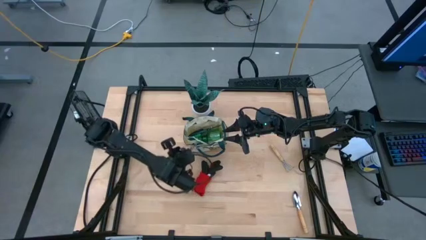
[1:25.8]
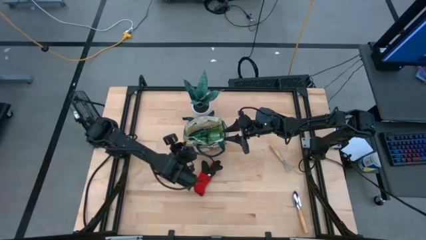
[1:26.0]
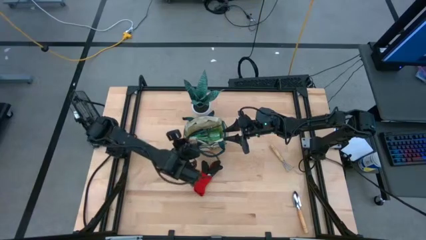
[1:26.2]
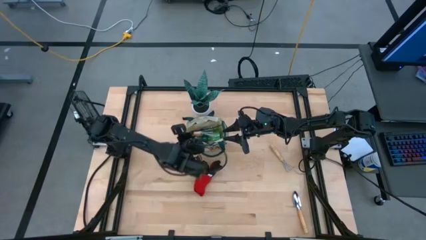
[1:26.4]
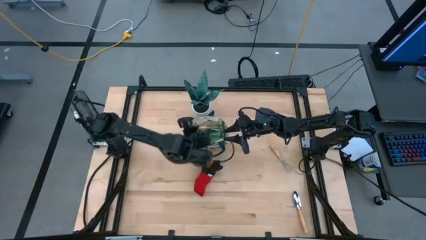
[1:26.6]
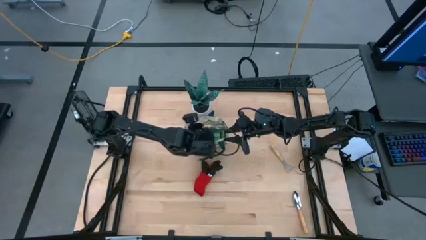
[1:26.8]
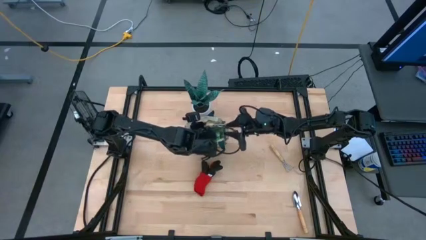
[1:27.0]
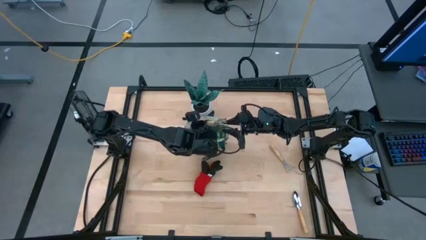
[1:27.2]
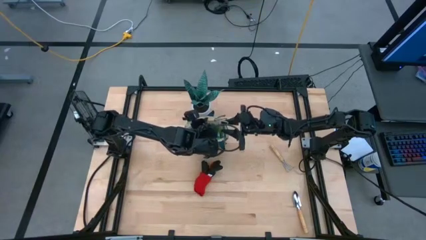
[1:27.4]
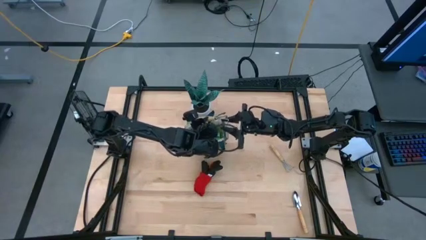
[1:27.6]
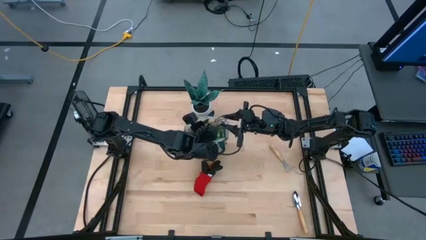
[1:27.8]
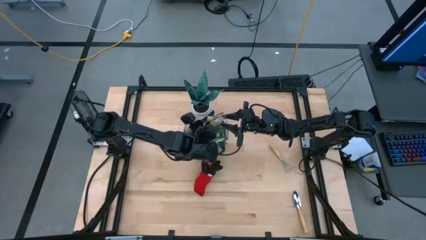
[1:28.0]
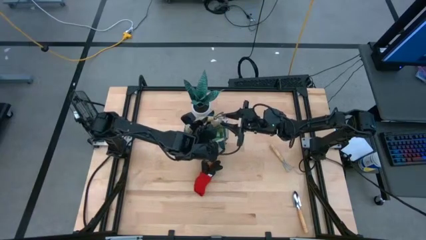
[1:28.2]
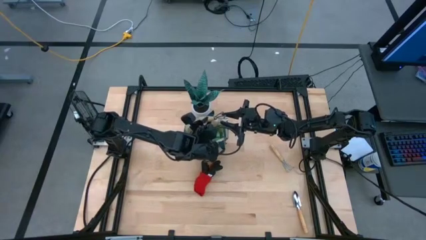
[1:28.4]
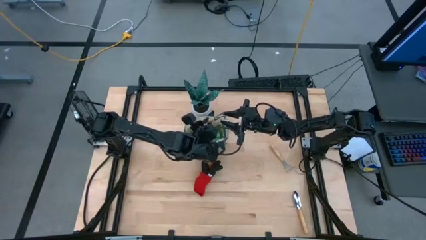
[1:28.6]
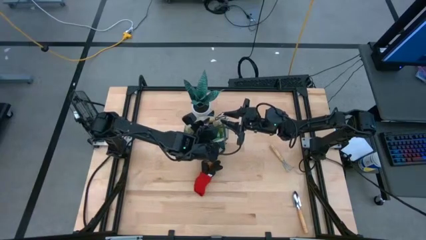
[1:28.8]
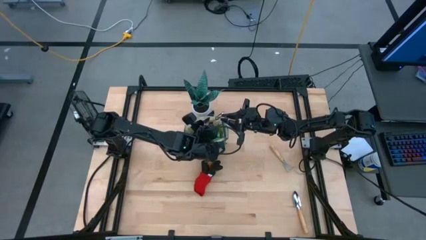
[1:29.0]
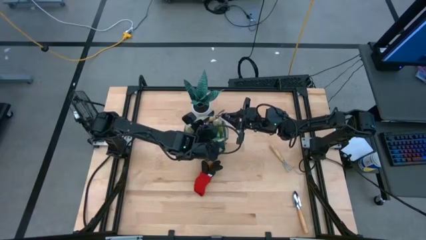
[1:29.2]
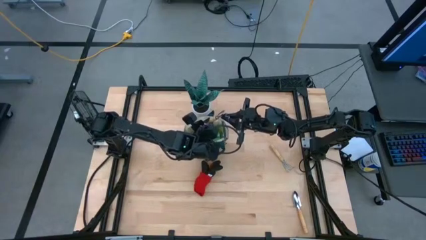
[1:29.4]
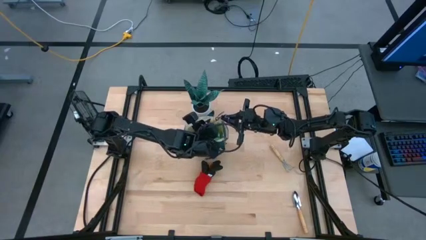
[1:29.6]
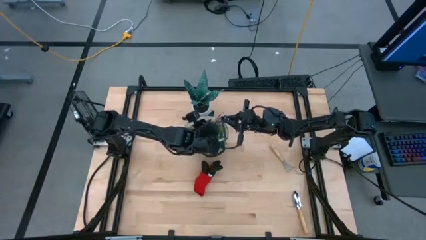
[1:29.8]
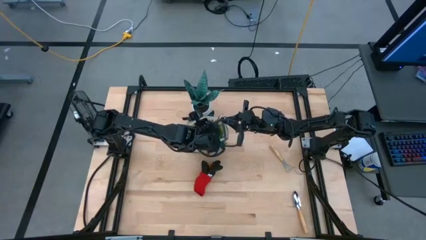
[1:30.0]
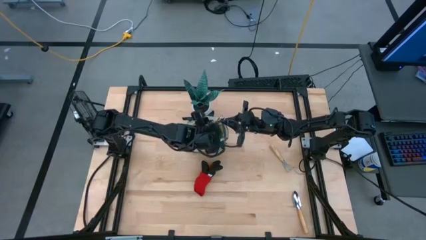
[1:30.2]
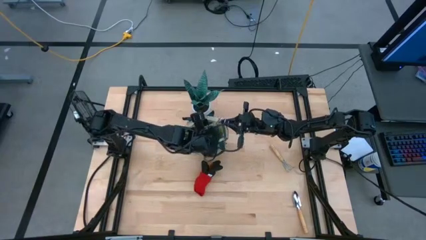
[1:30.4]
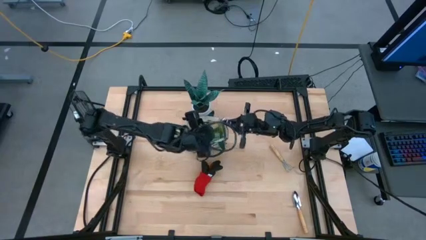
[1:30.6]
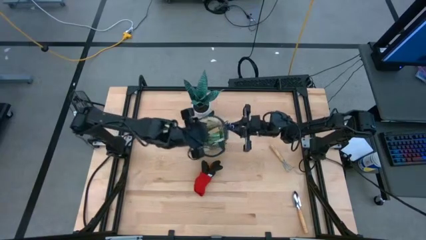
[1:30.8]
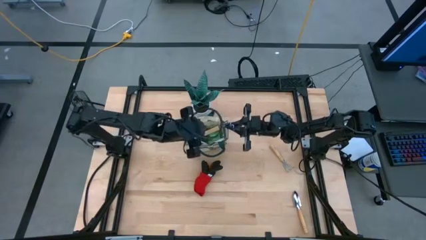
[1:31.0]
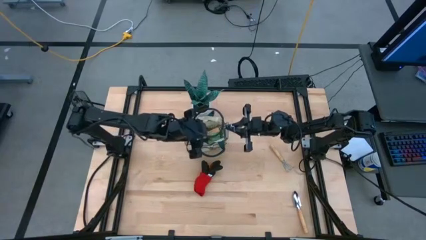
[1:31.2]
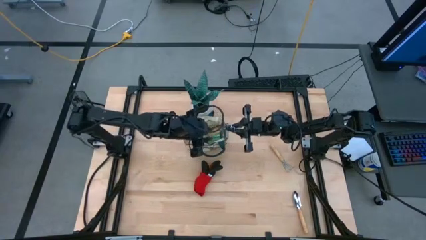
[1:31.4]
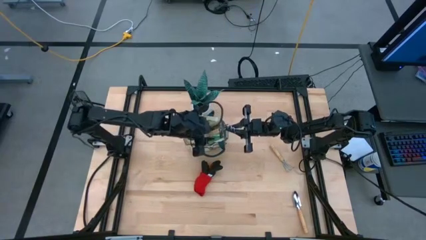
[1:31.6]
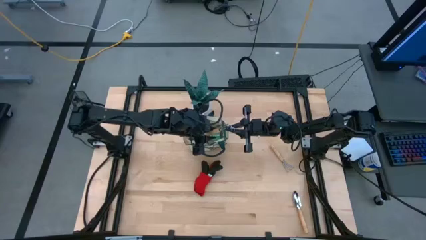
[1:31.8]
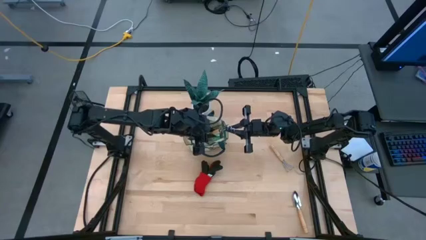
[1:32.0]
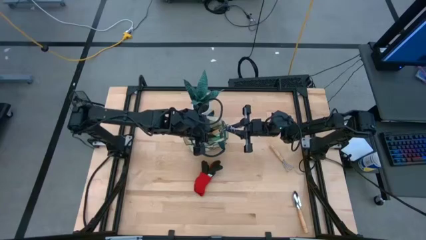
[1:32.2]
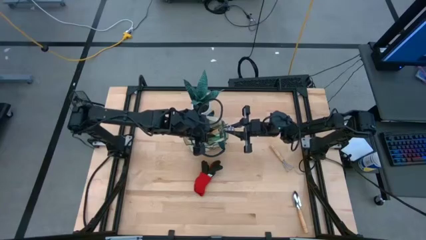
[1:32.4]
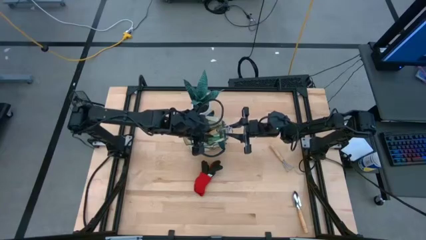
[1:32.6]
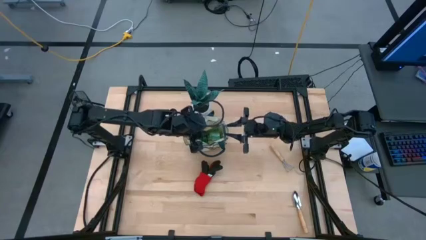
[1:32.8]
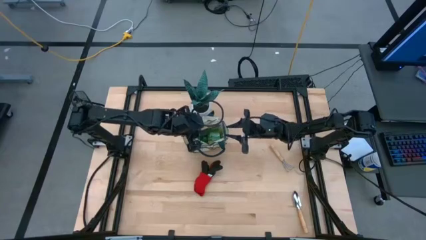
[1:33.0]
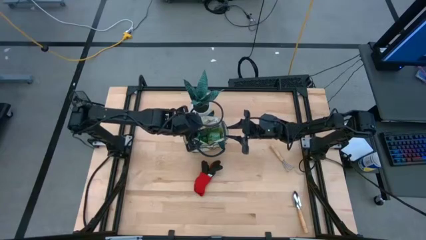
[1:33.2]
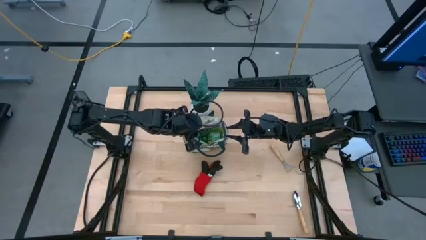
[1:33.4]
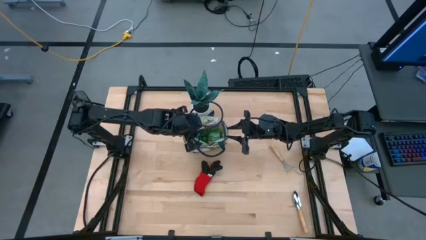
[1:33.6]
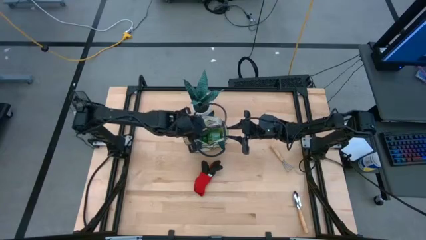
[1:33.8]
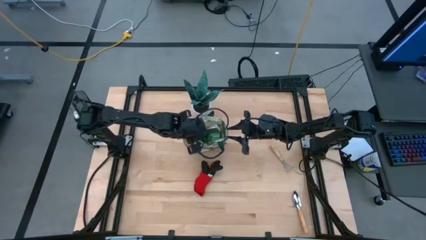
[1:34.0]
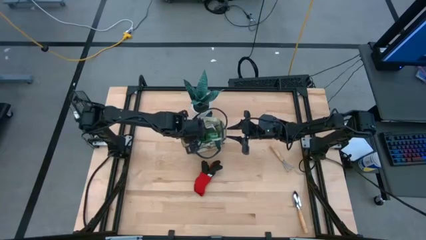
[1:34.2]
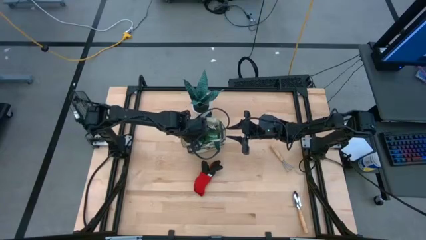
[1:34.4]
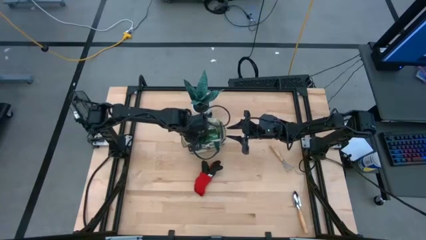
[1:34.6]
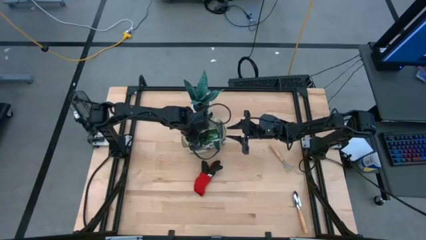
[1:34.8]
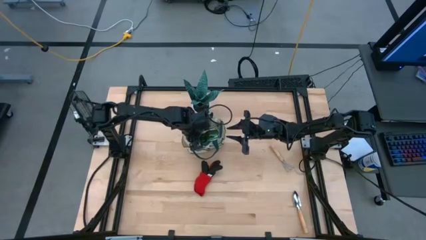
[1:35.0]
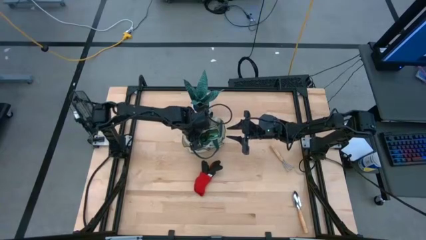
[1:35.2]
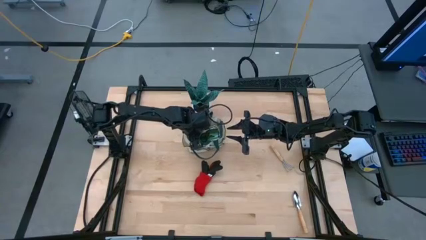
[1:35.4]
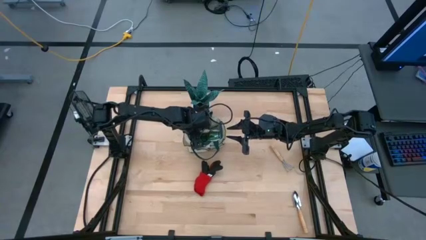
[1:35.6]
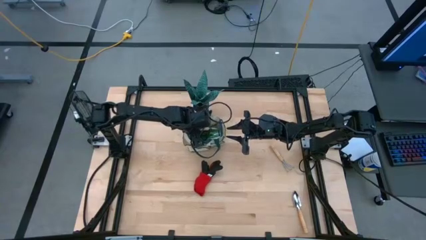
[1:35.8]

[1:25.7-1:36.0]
Task: Pick & Place Garden tools in Gardening bag
Put the left brown hand rake into the gardening bag

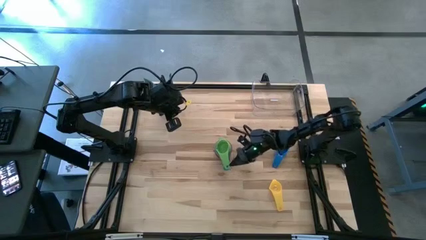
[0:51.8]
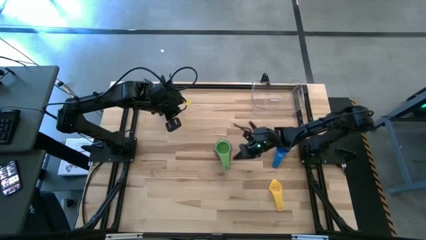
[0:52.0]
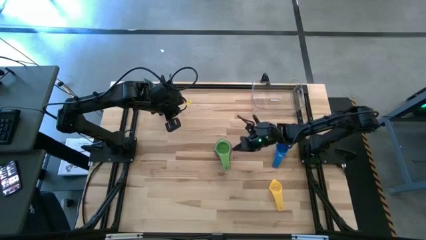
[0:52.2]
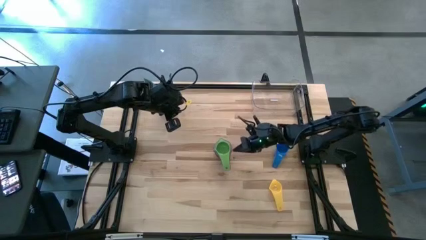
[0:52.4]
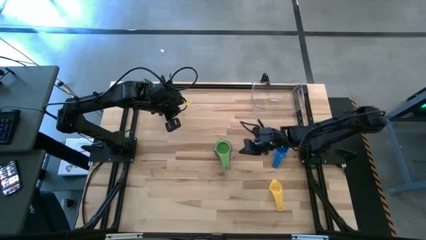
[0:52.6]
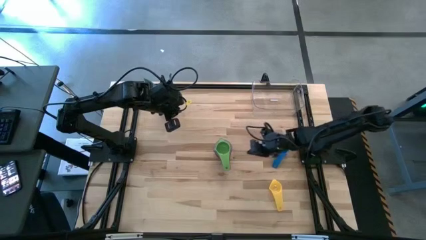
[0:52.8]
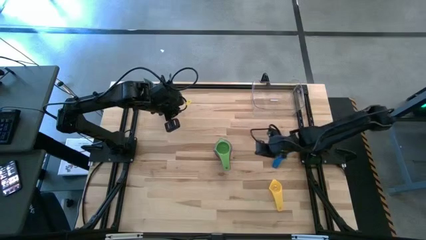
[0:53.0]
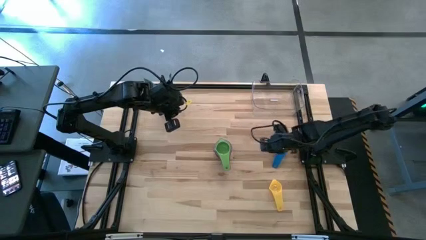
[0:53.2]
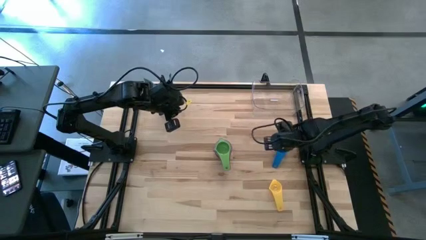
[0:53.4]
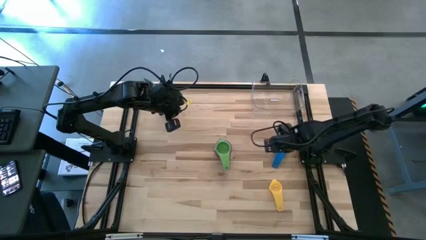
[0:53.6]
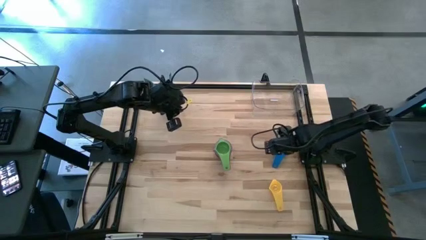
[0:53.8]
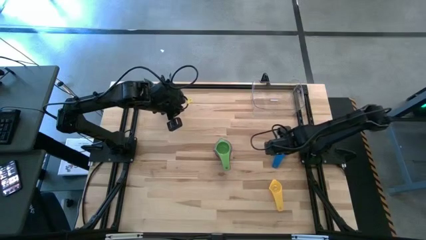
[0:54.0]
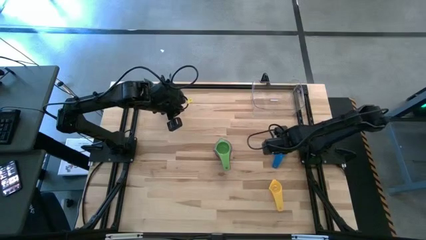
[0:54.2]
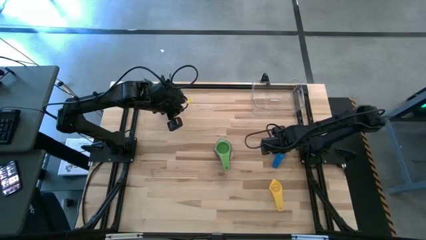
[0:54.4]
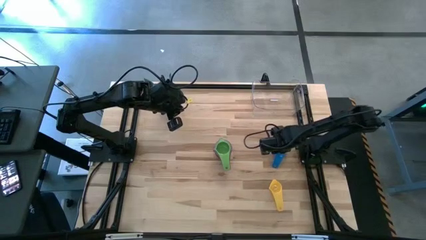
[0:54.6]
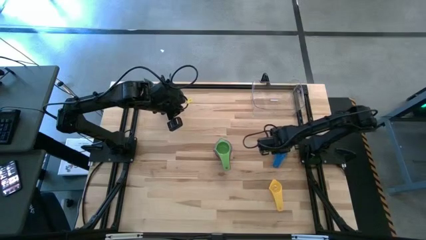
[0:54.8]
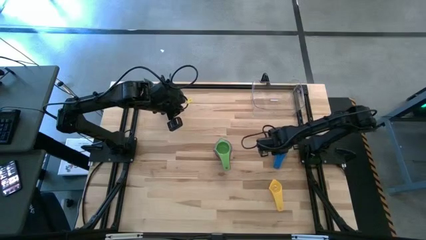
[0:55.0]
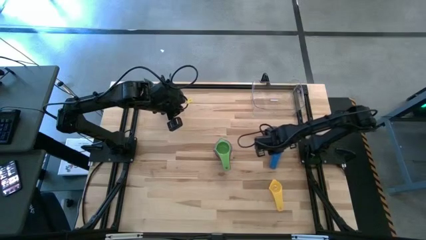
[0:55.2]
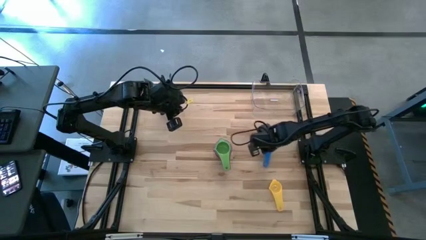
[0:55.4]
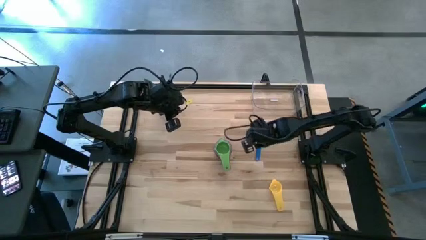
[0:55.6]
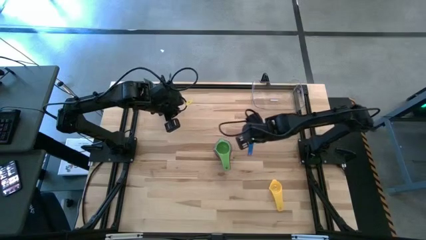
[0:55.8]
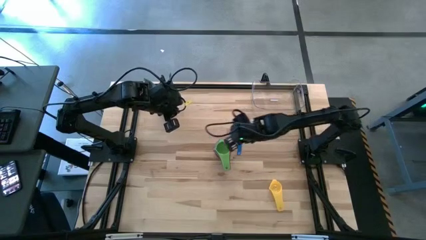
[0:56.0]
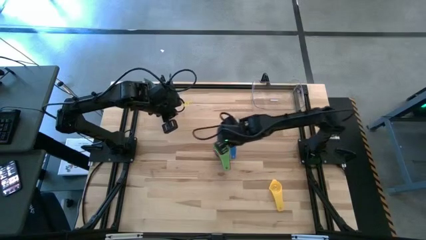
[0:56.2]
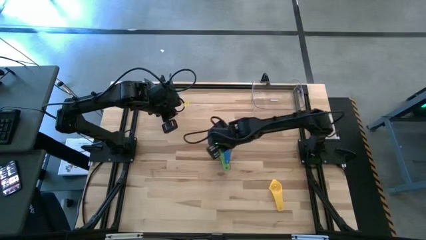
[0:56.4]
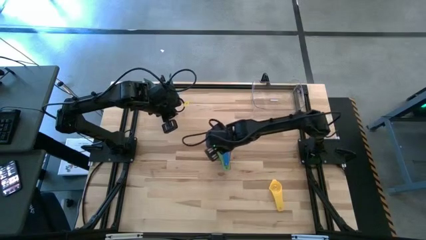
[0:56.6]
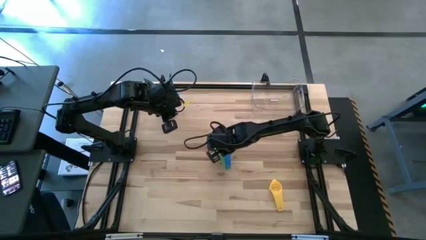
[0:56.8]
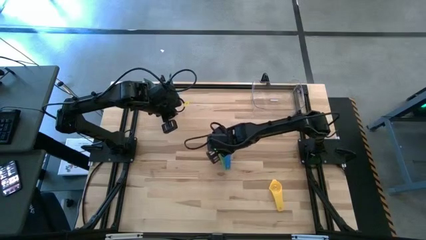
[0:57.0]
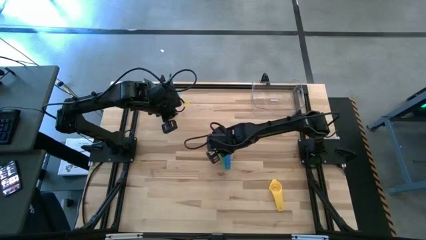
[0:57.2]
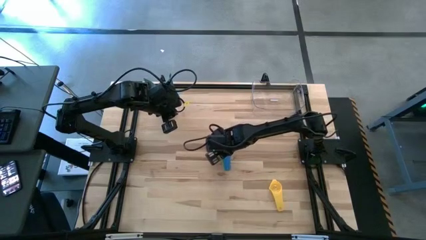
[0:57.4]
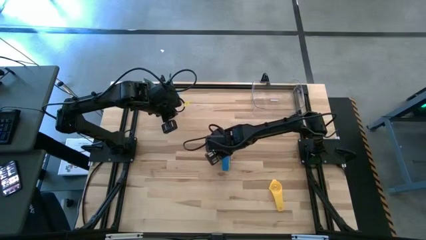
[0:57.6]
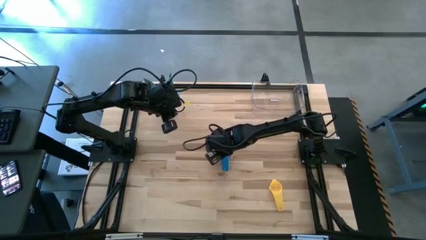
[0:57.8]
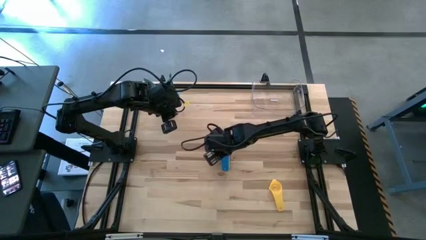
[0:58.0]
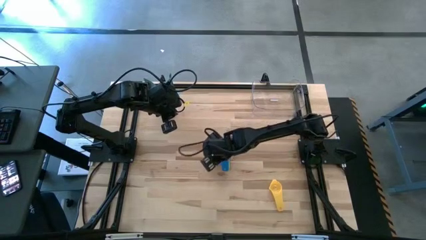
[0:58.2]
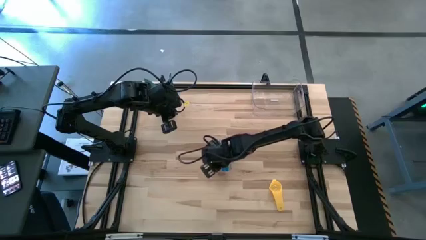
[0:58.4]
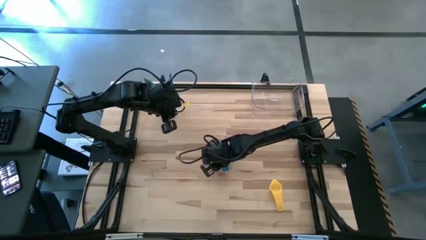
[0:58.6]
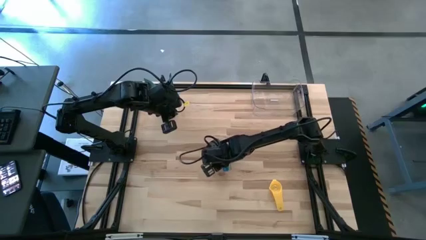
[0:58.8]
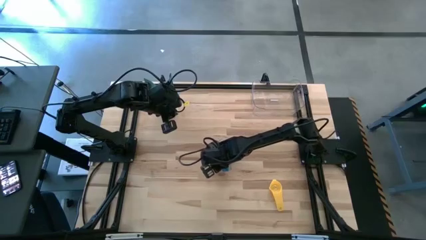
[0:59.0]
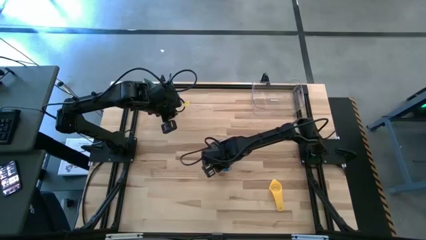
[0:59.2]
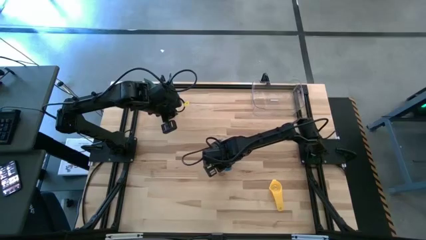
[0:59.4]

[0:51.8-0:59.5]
Task: Nest measuring cups in basket
Stack the blue measuring cup on top of the green measuring cup
